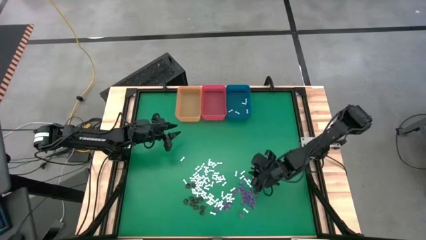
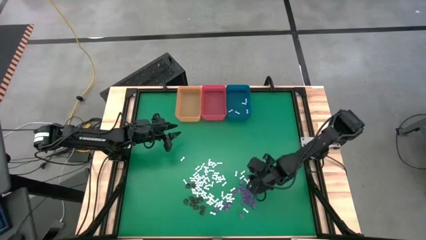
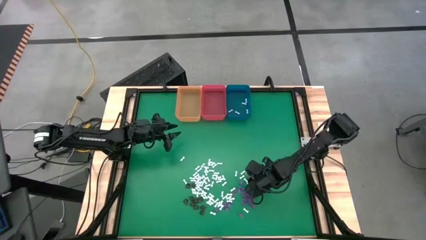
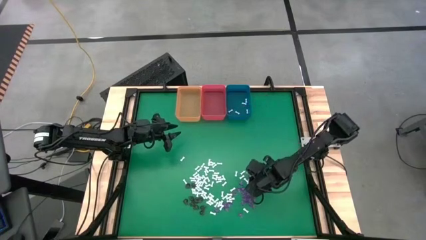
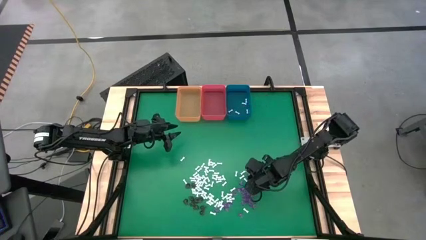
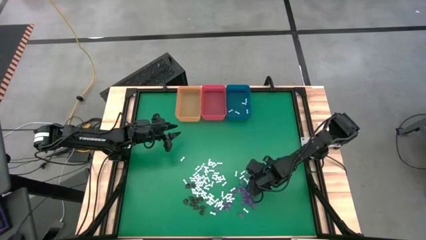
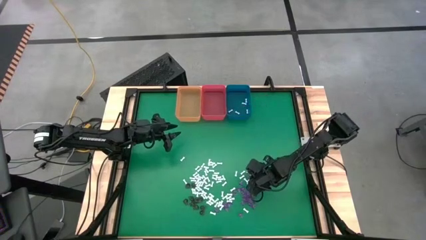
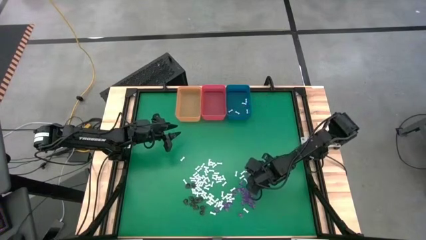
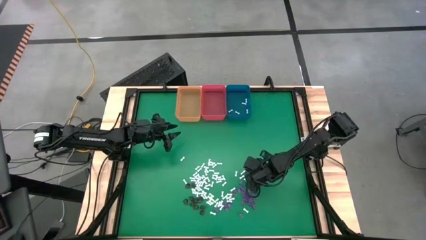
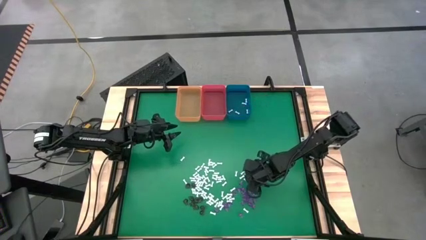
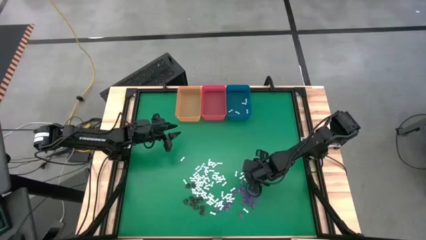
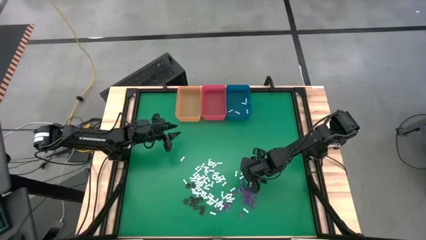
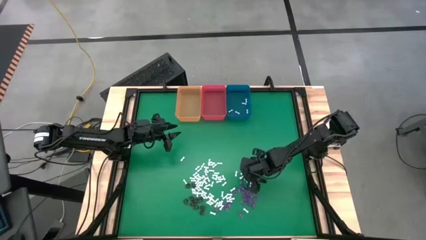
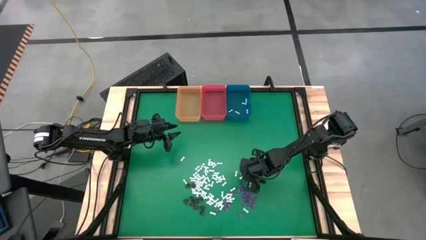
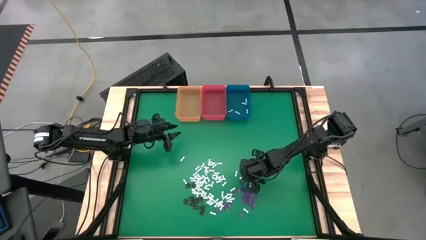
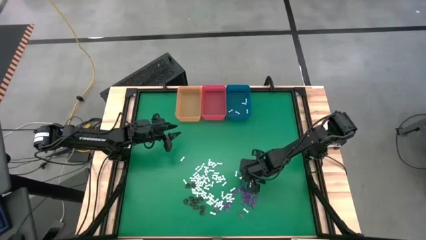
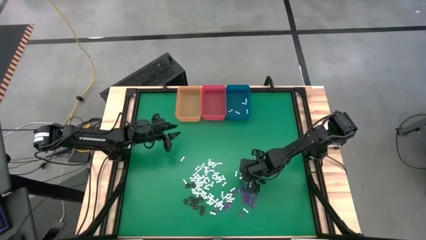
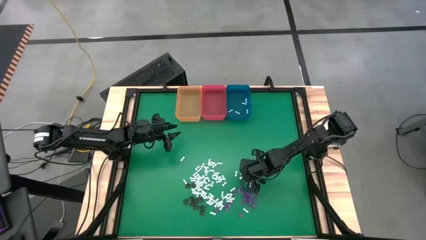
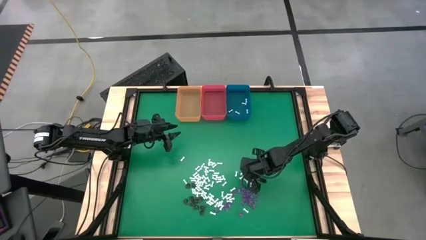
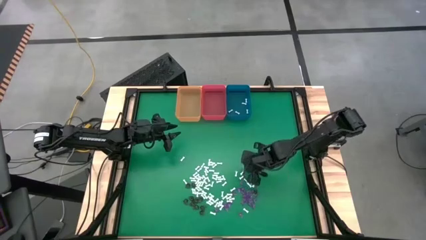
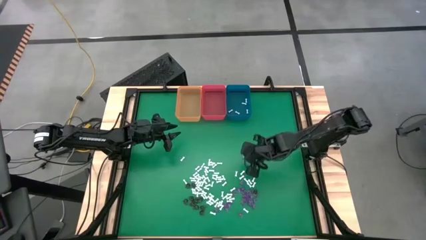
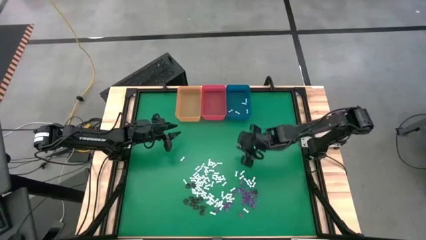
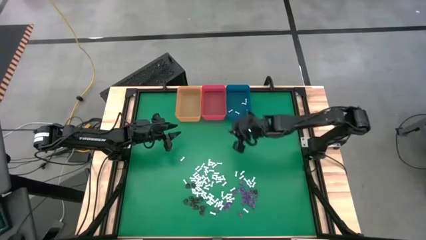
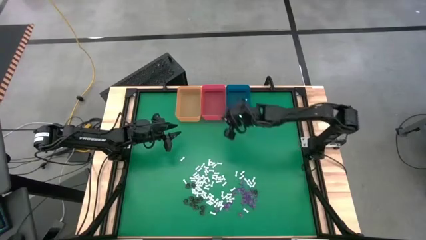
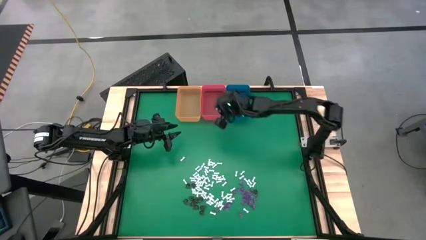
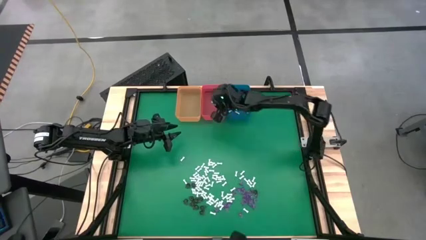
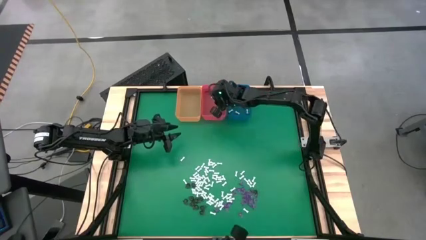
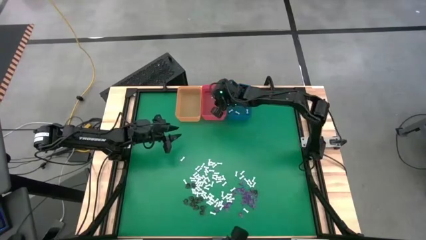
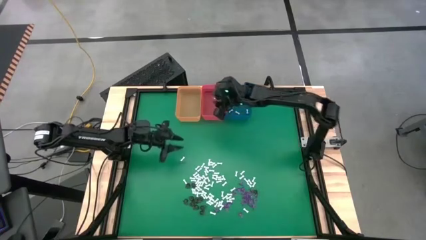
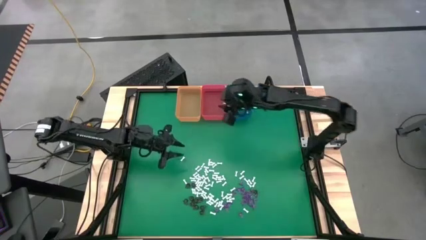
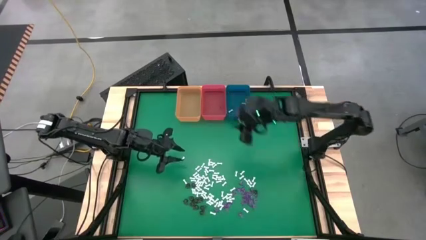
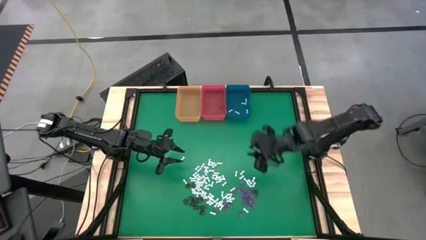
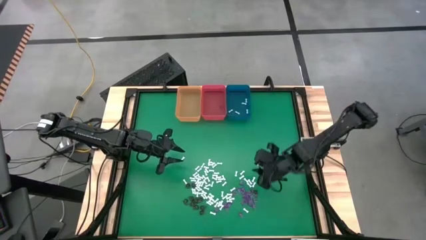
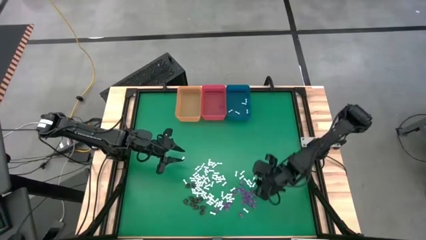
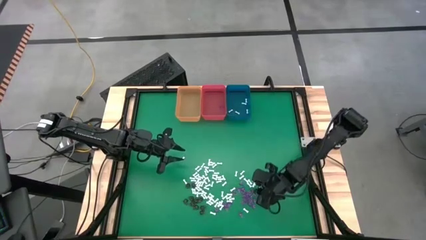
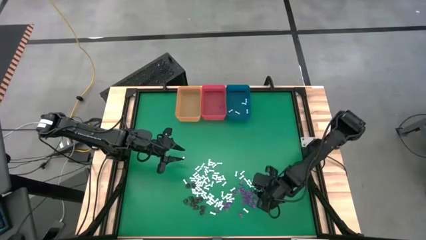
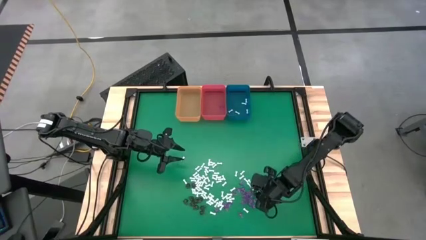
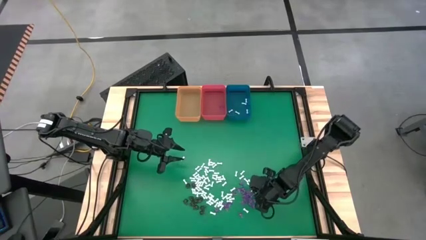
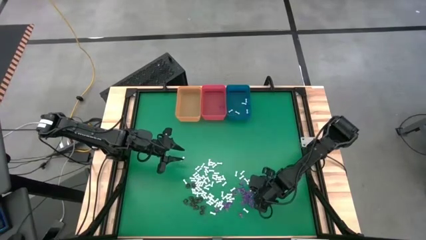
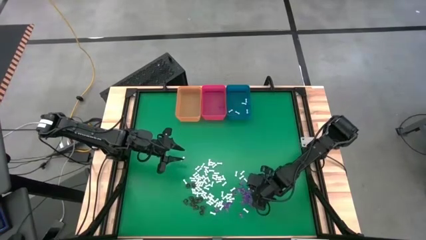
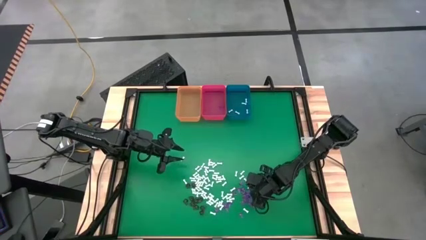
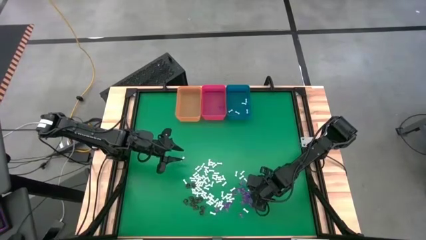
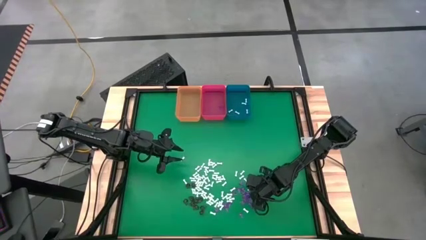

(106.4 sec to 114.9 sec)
Task: Sort Halloween decoration
Put the violet witch hat toy into the red bin

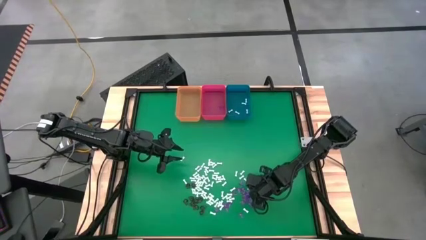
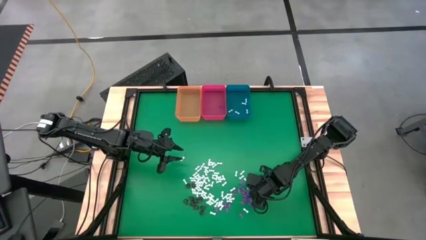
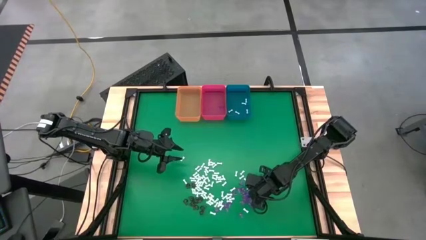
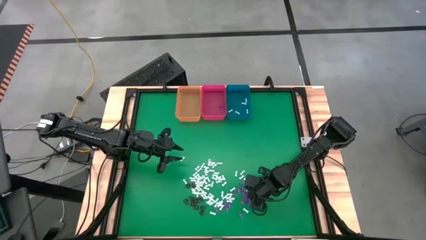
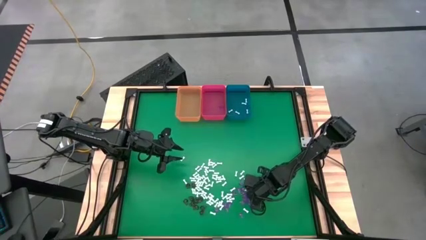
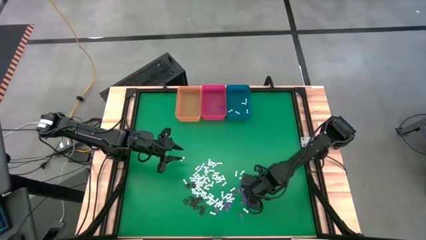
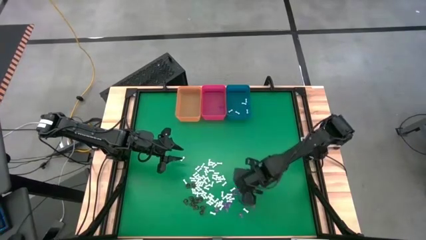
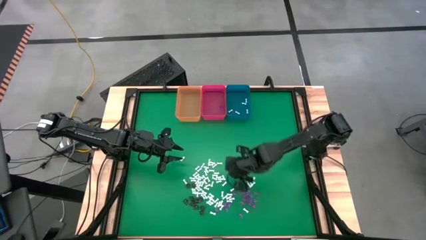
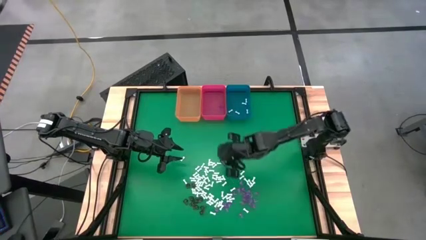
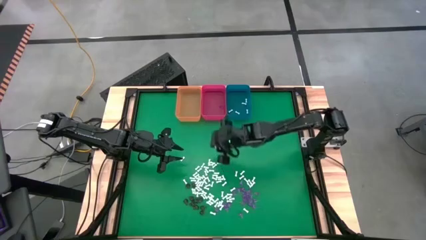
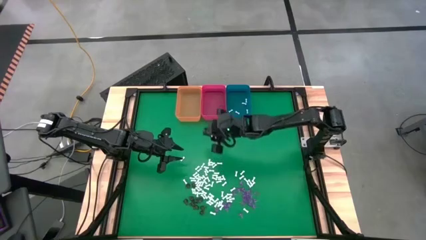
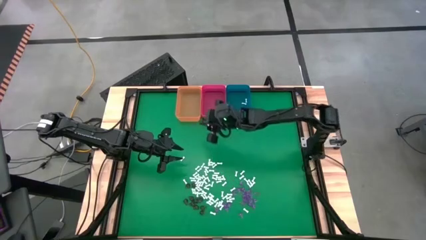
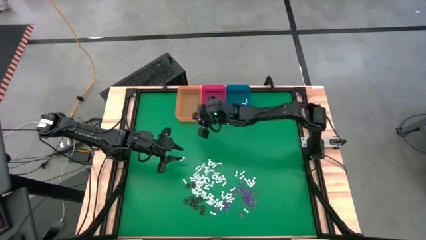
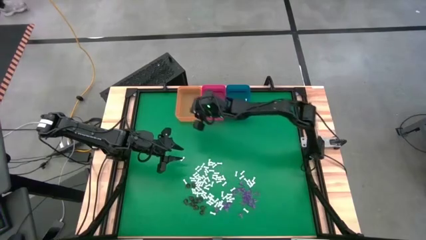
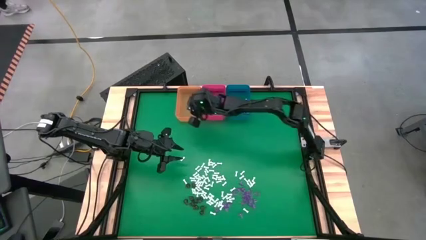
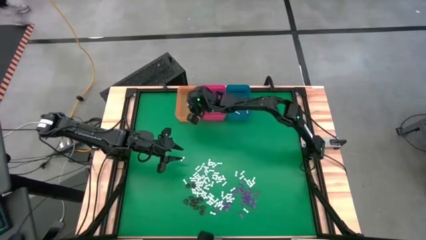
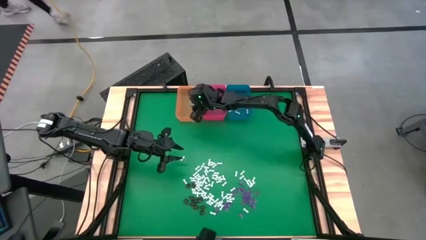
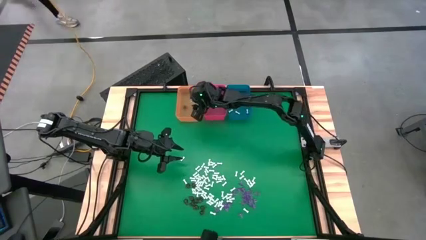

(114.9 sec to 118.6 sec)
Put the transparent black skull toy into the orange bin

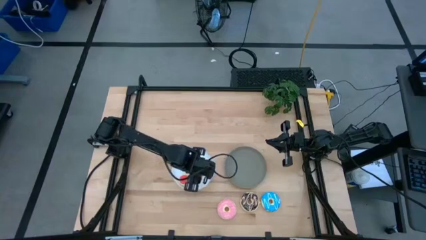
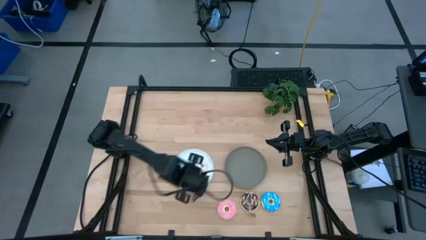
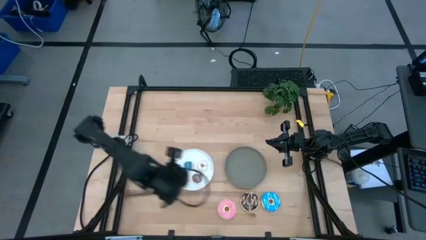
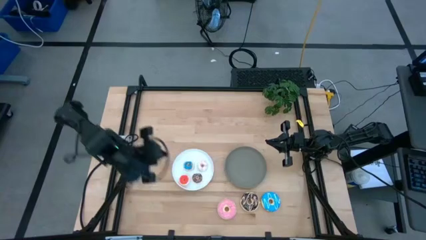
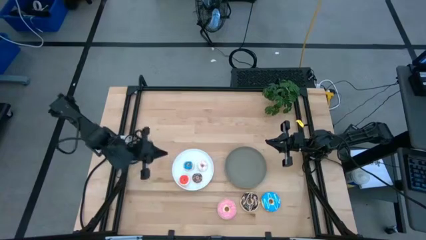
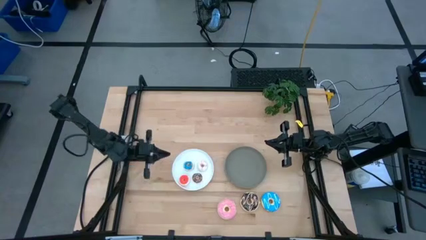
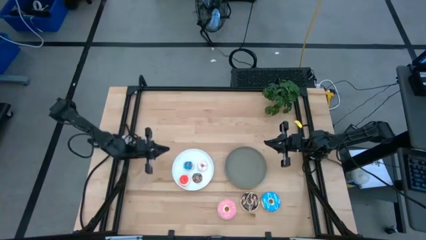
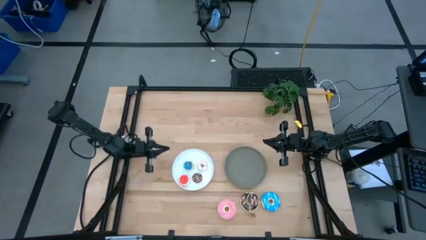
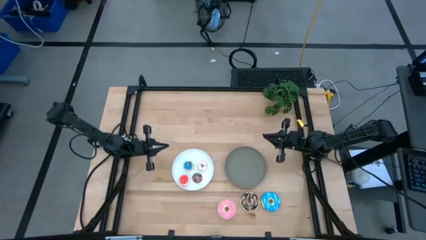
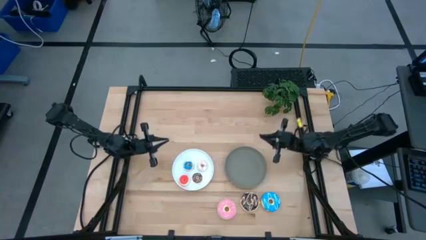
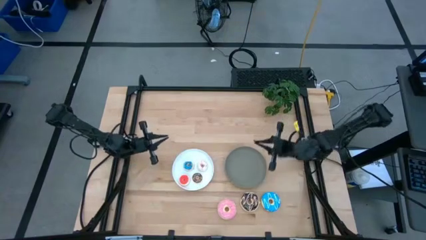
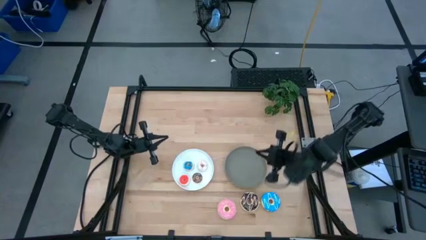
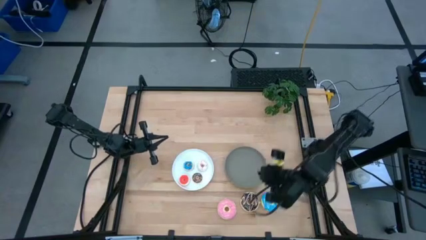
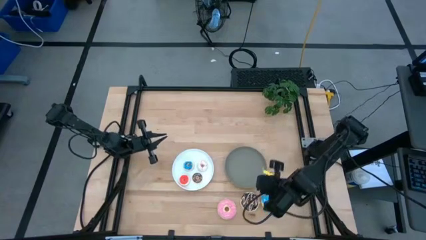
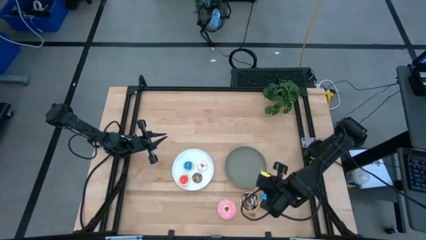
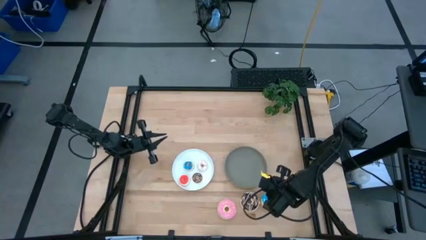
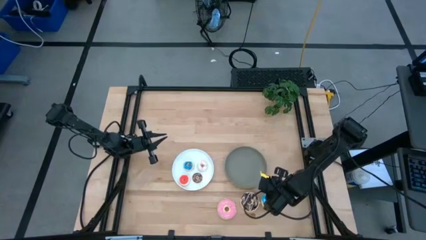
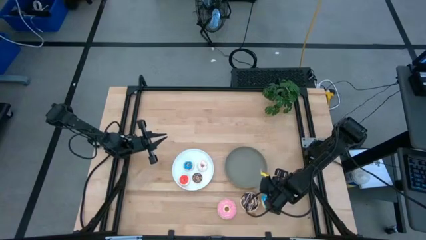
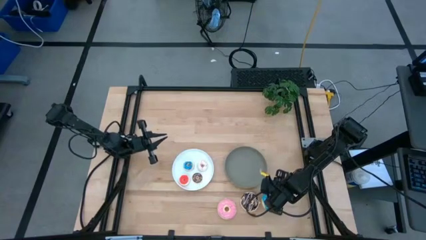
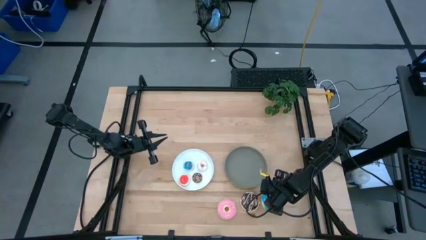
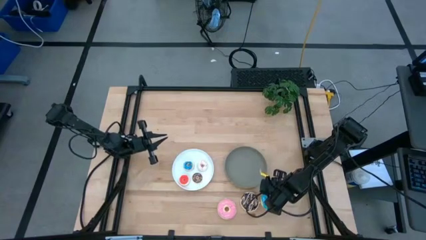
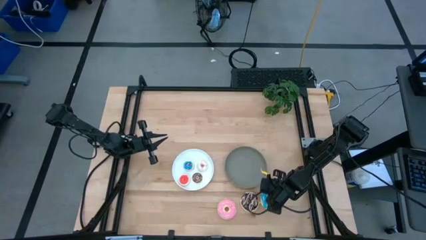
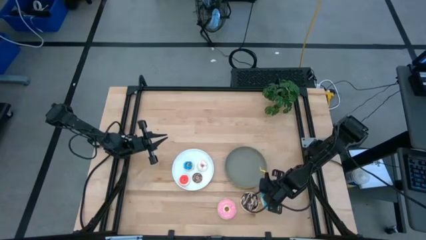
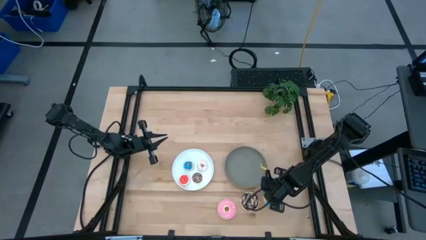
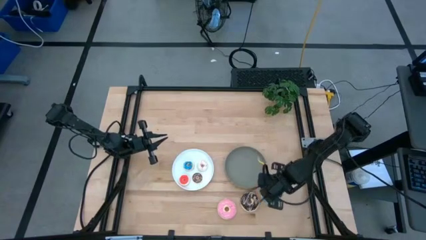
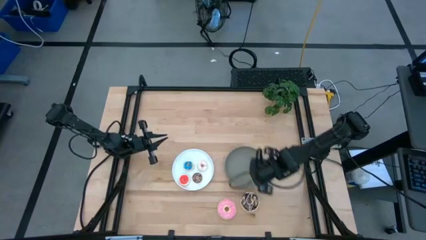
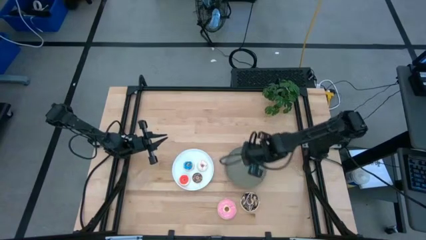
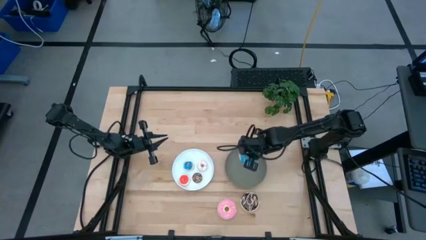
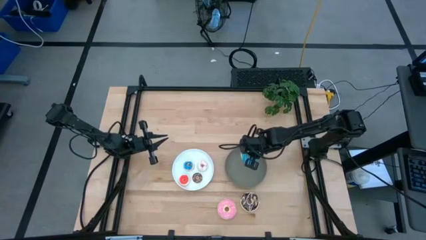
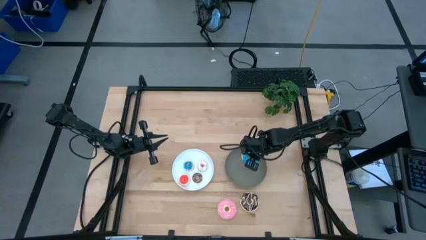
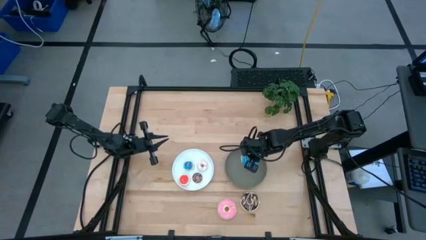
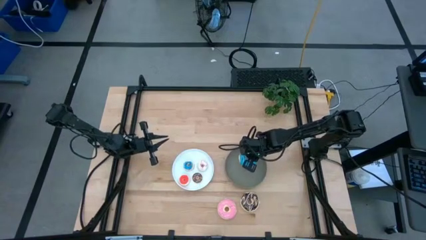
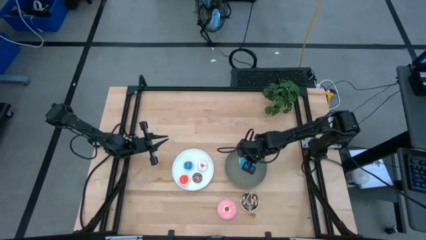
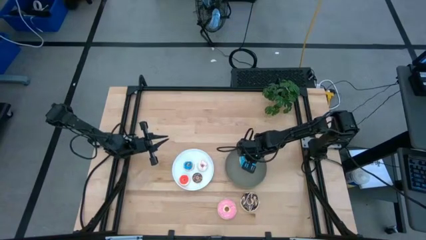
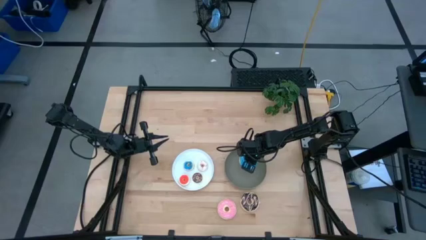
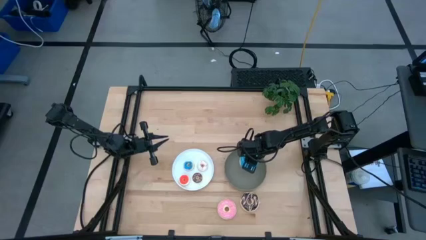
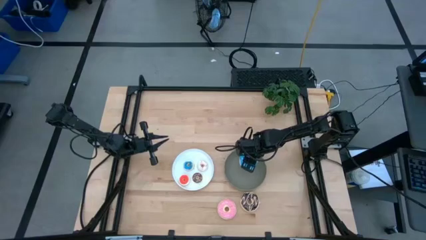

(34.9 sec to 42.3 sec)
Task: Pick & Place donuts
Put the large blue donut on the gray plate
